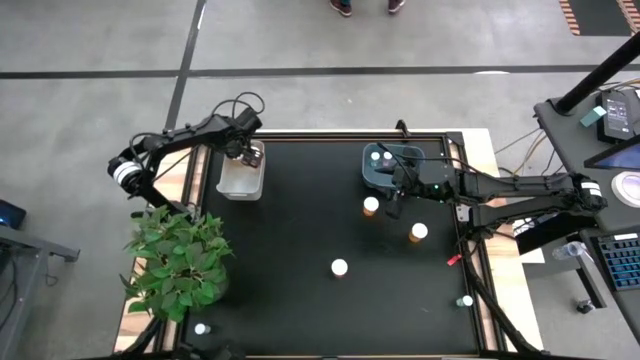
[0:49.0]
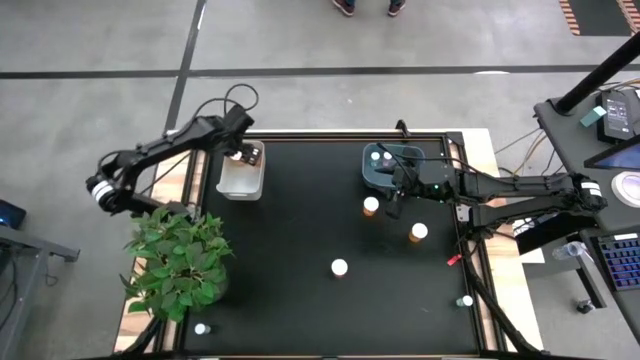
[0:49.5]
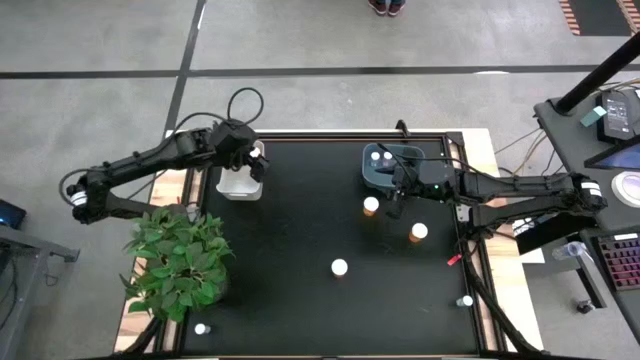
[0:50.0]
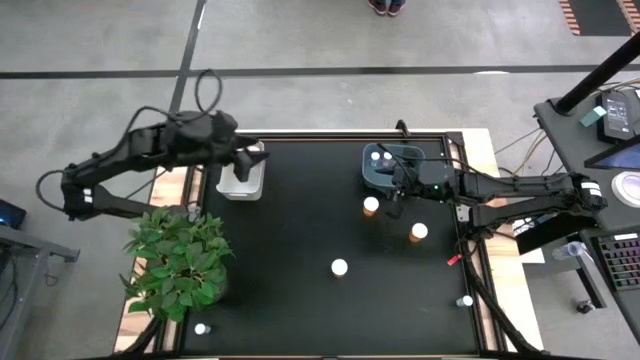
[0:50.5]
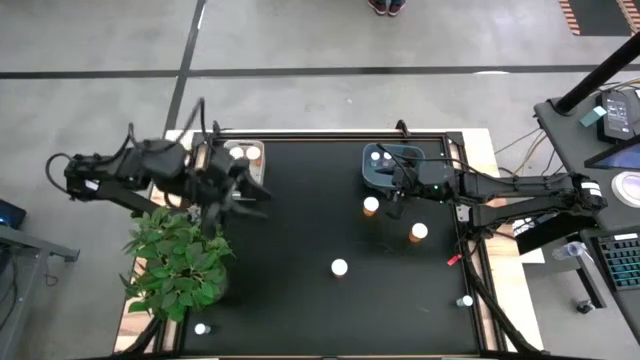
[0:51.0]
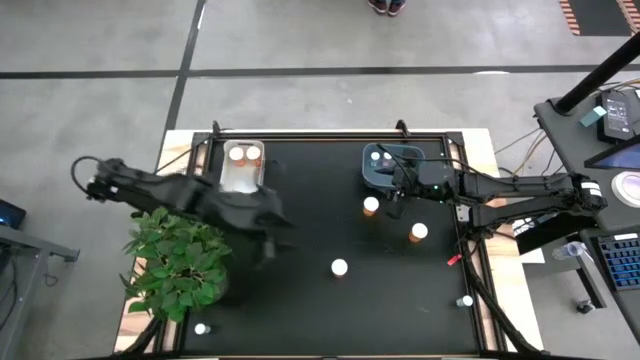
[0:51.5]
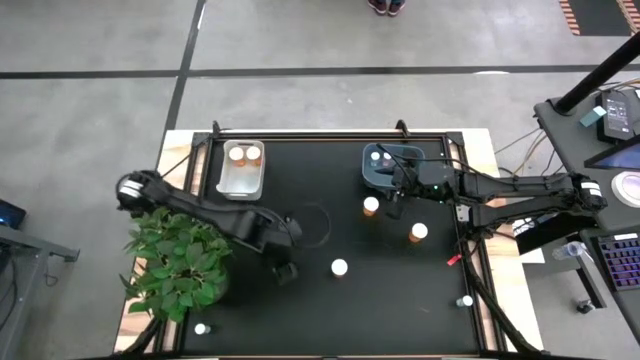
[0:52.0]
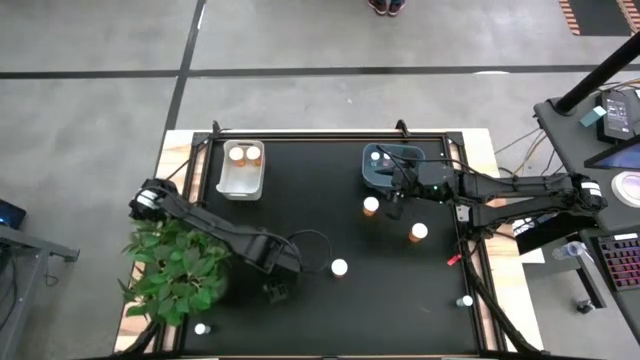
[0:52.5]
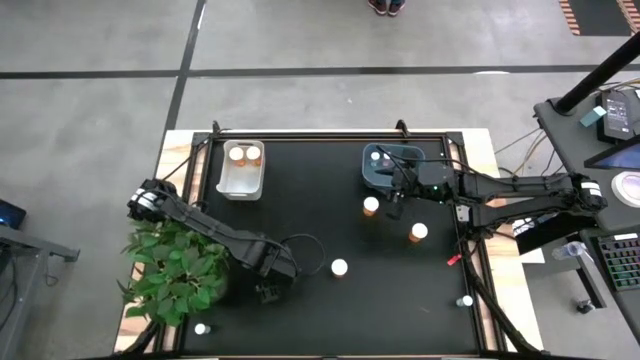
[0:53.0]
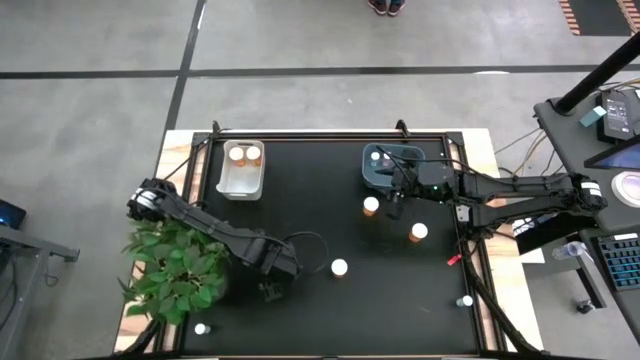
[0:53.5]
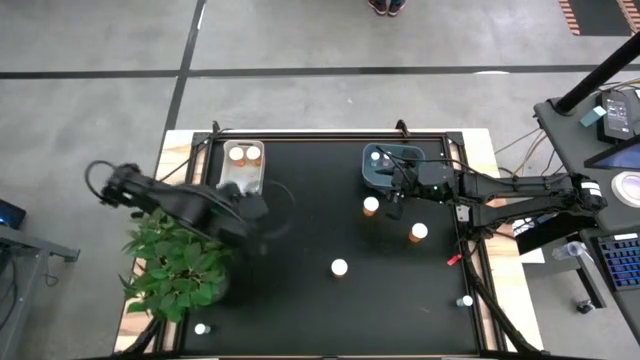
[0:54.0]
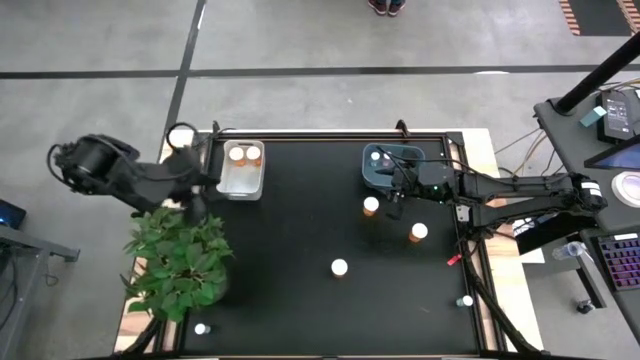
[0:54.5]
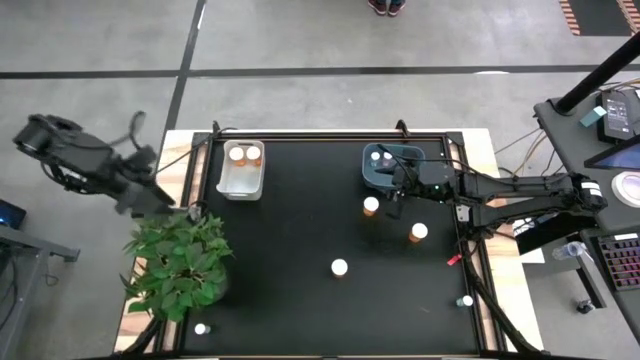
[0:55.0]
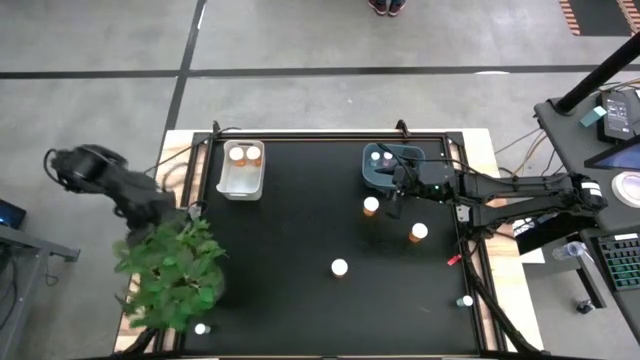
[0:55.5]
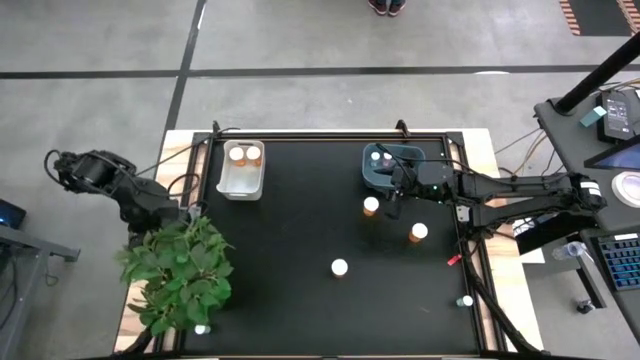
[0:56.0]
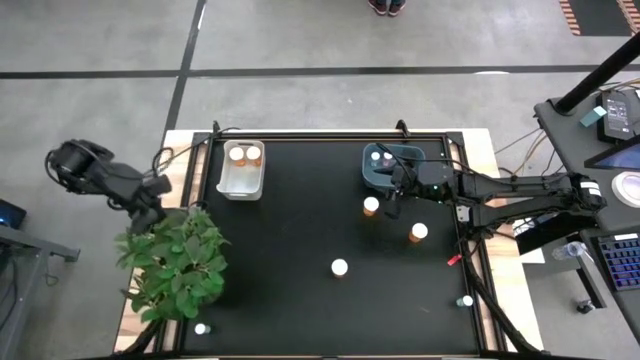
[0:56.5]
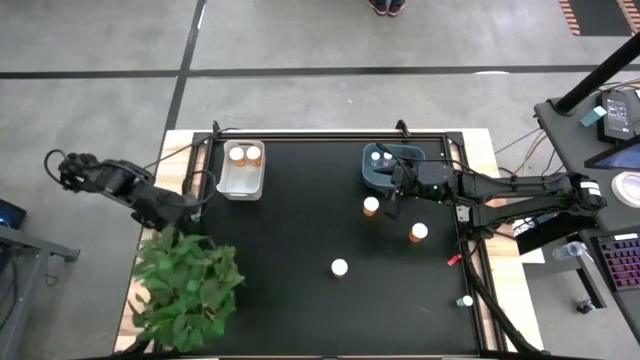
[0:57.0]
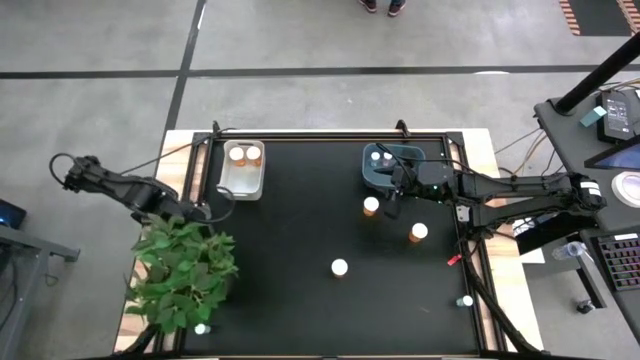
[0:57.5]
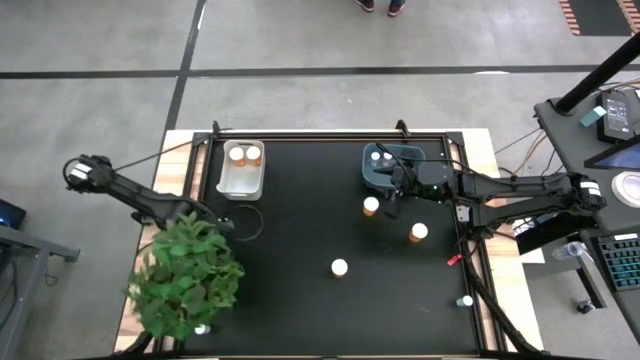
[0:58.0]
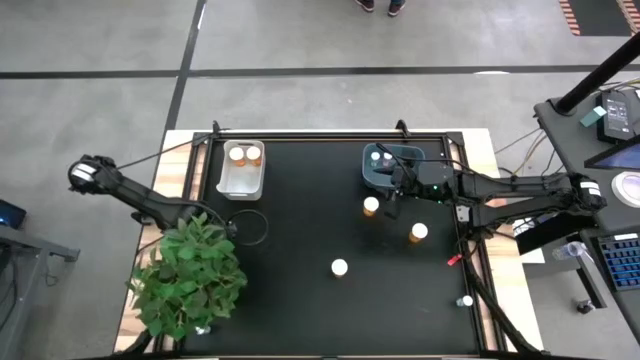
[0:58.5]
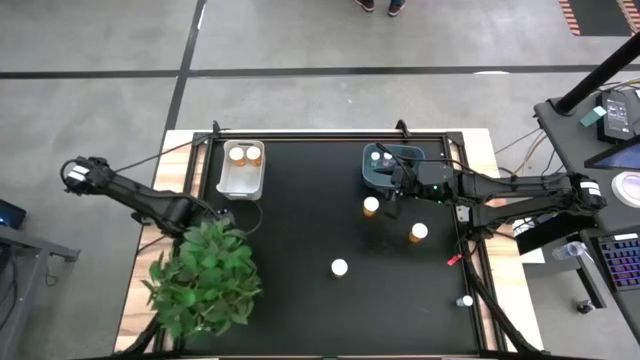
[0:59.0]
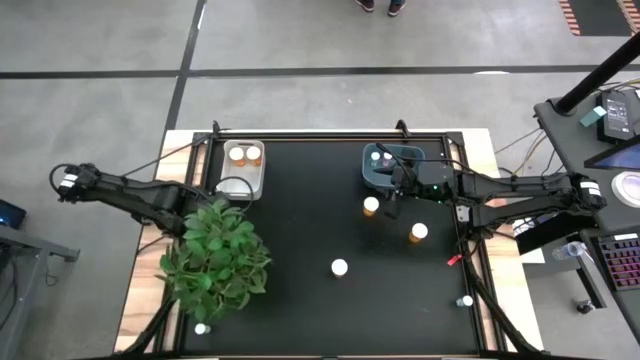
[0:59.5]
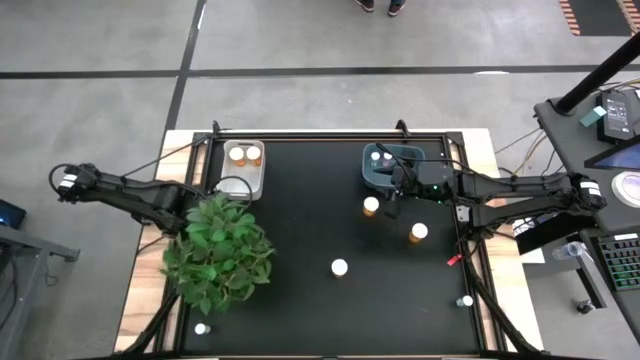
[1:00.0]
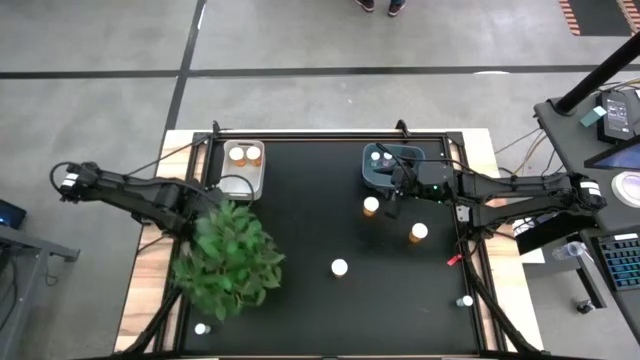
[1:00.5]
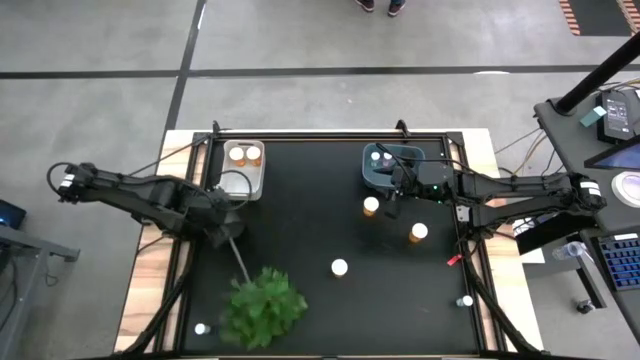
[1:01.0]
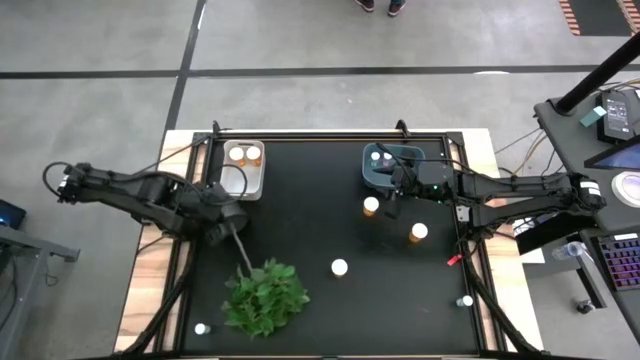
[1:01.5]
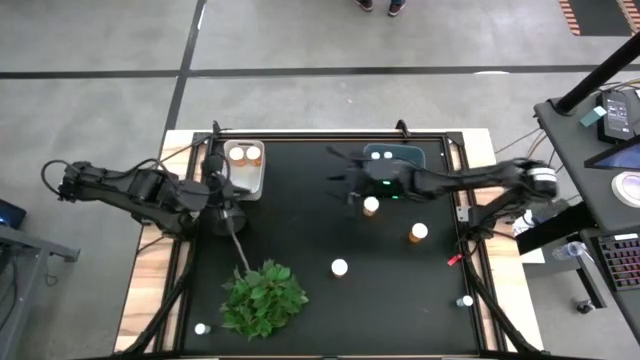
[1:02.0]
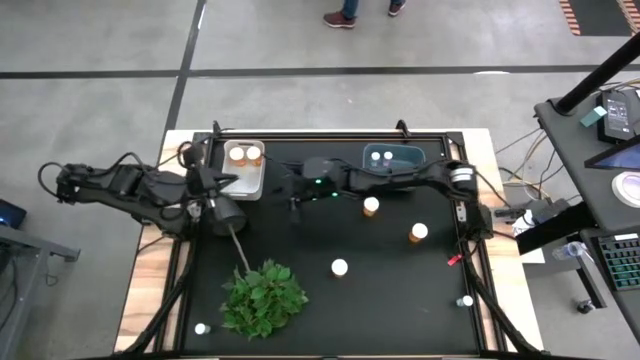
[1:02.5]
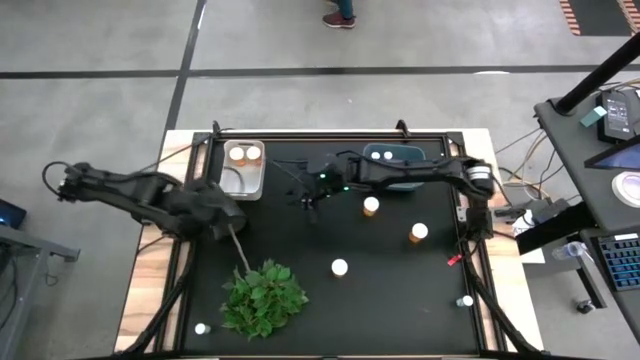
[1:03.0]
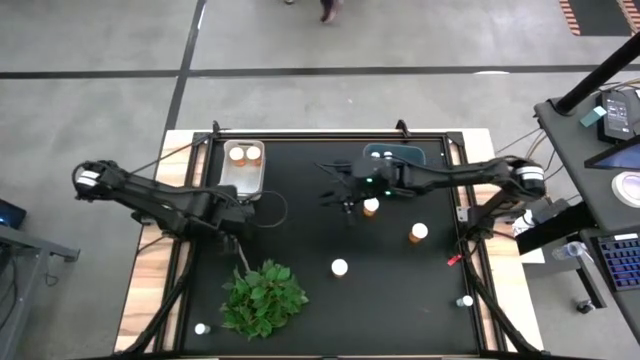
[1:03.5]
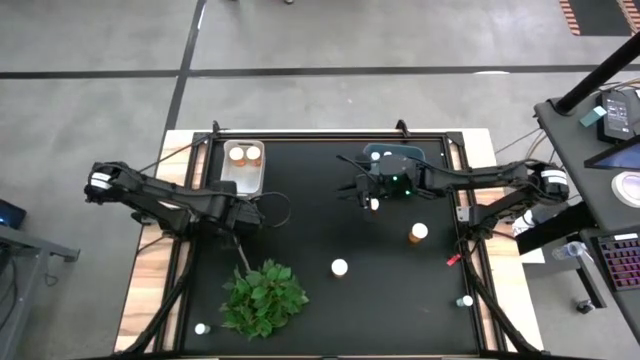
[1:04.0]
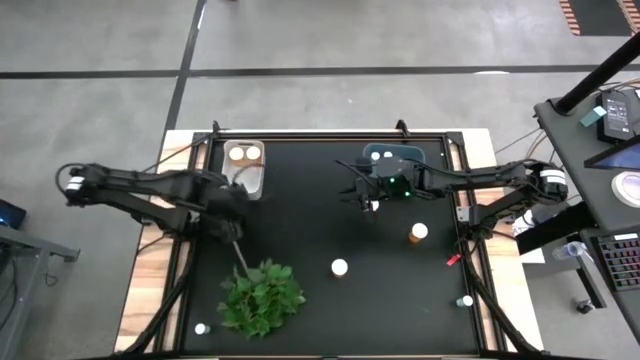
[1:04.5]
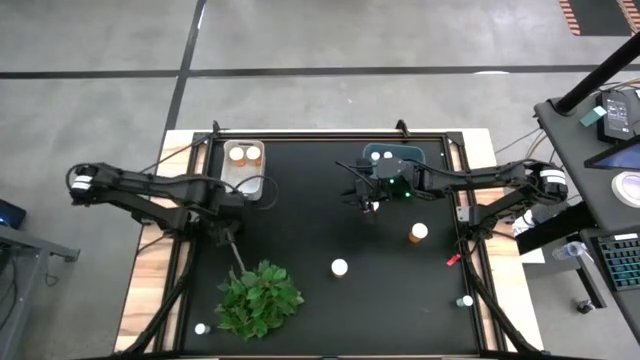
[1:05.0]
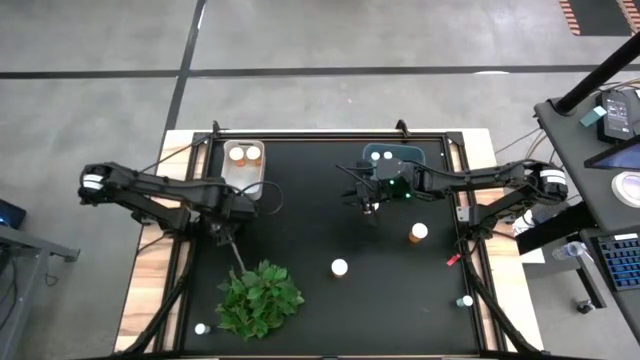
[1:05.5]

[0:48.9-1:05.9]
Task: Pick and place medicine bottles into bin by pill shape (circle, oval)
Move the potted plant to the center of the table

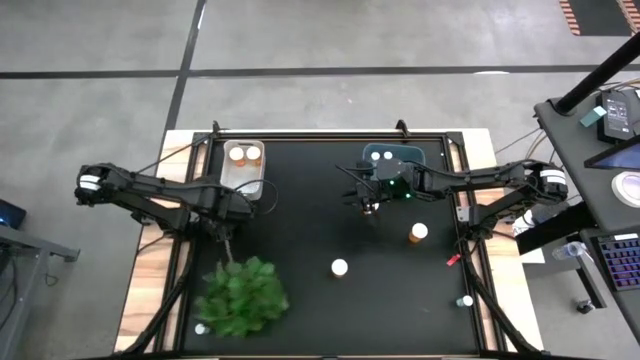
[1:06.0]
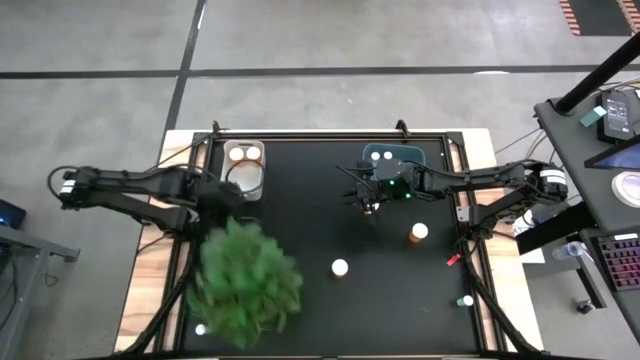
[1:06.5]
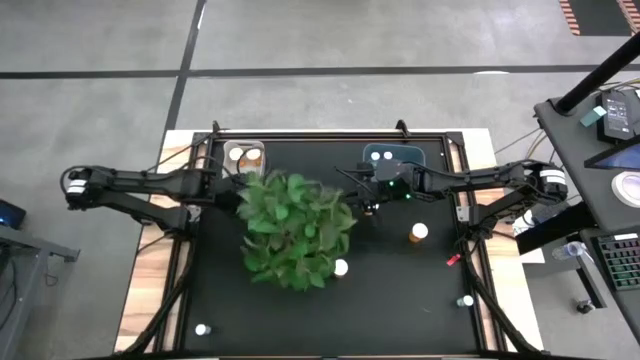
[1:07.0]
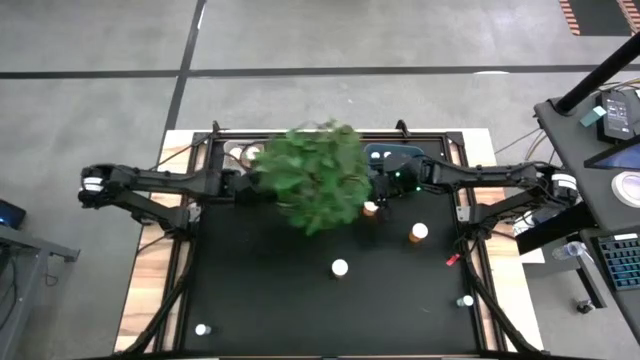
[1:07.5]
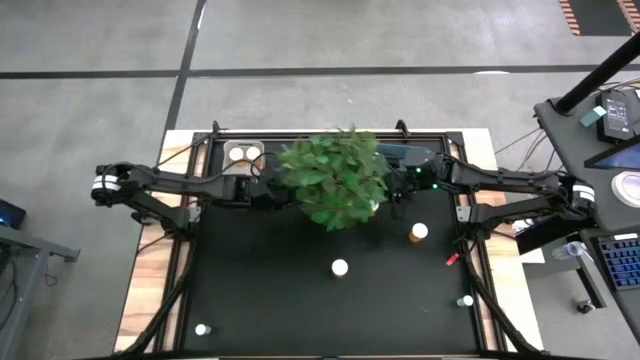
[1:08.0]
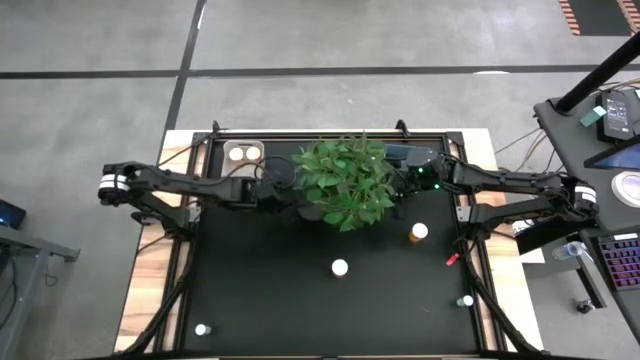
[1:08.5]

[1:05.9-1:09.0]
Move the potted plant to the center of the table

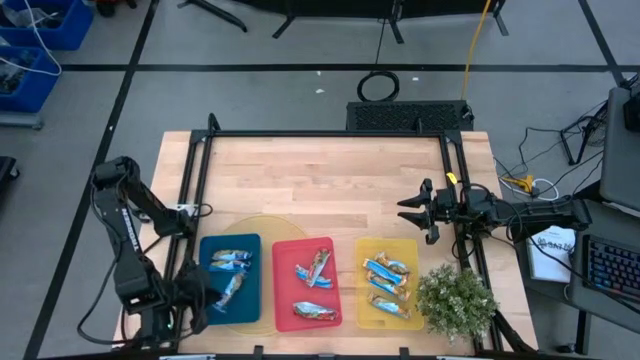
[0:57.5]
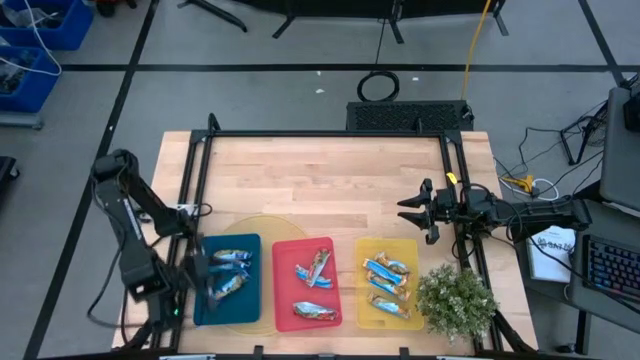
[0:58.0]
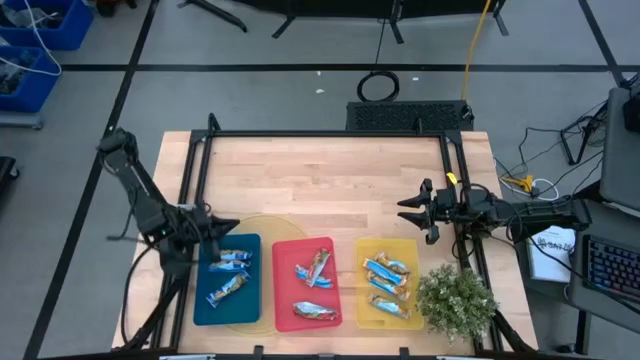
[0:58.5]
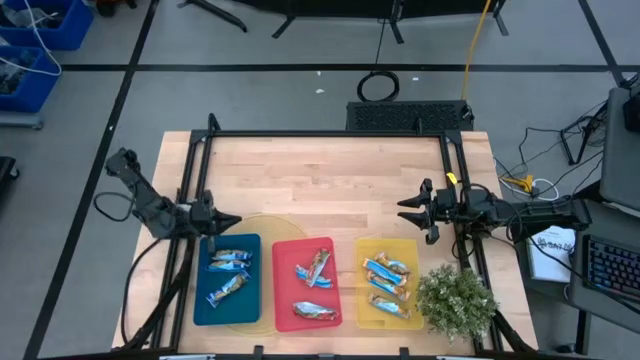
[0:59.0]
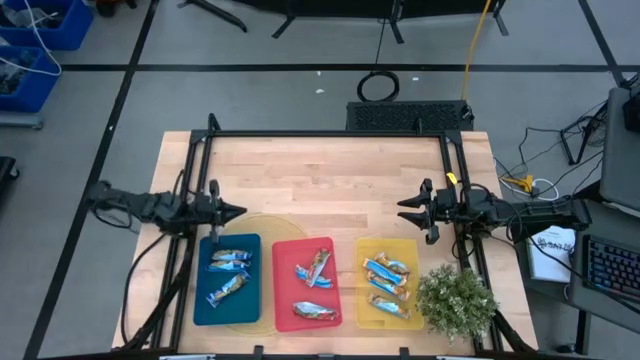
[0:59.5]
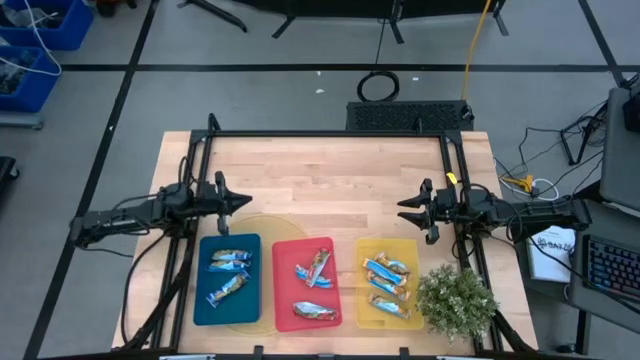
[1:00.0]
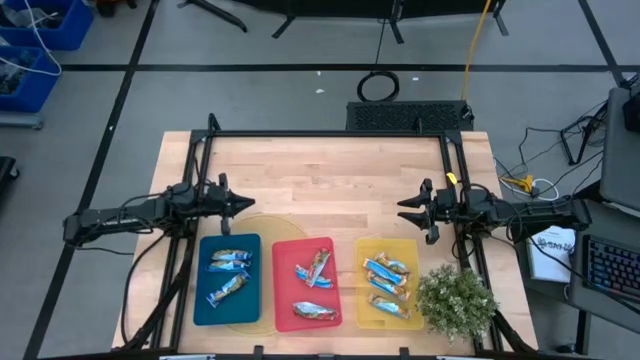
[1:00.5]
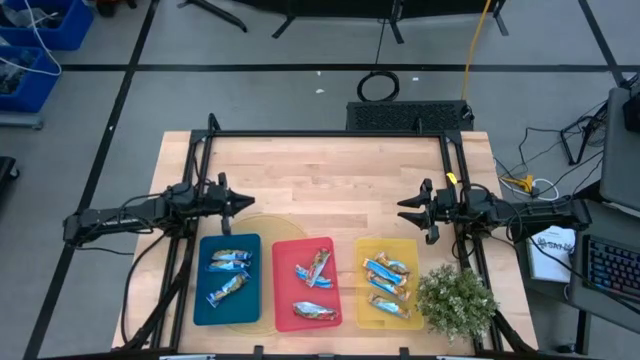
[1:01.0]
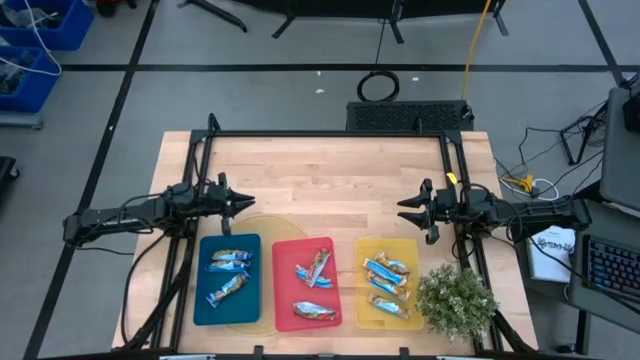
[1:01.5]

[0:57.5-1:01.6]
Task: Pick and place Granola Bars by type
Return to Home Position
